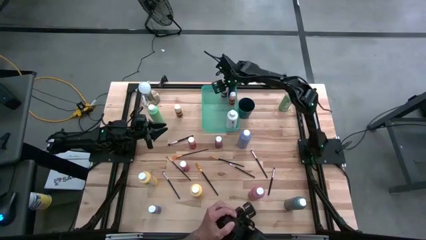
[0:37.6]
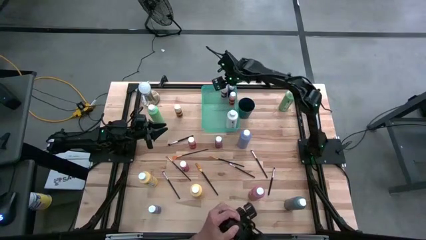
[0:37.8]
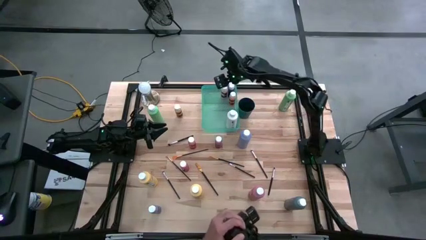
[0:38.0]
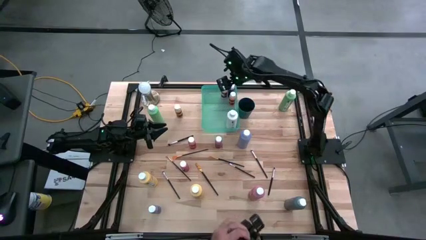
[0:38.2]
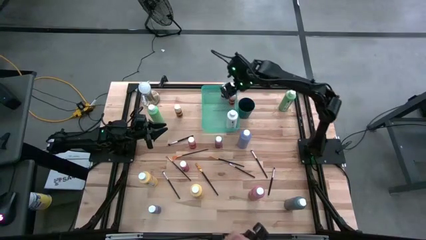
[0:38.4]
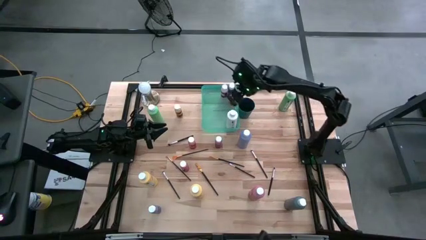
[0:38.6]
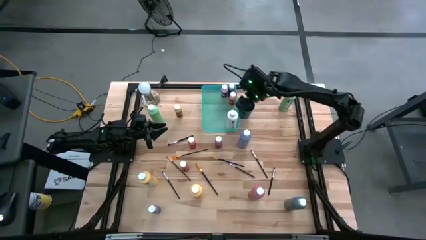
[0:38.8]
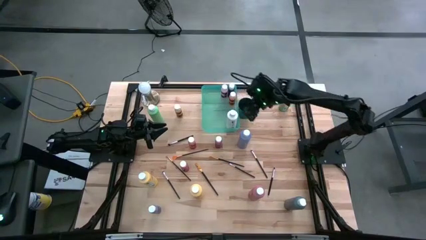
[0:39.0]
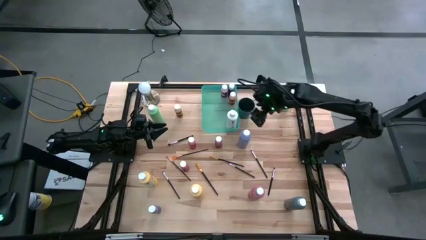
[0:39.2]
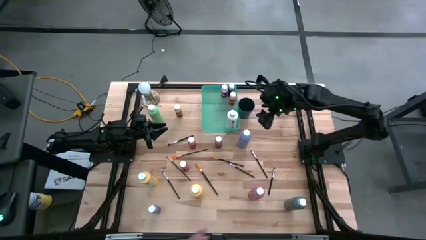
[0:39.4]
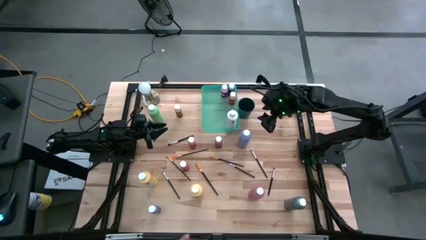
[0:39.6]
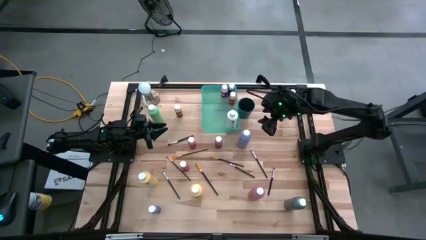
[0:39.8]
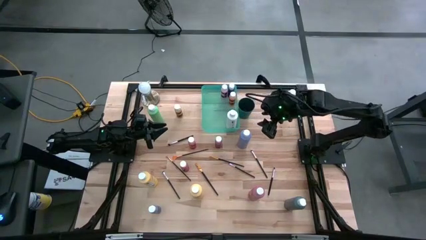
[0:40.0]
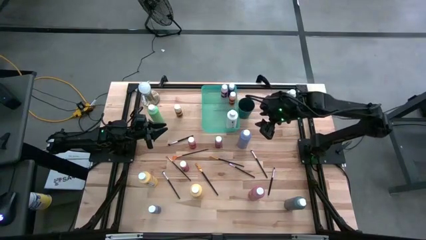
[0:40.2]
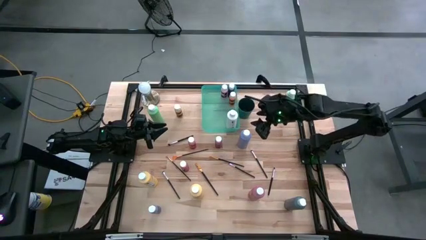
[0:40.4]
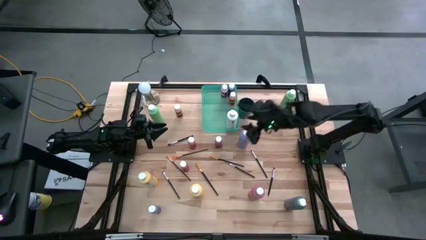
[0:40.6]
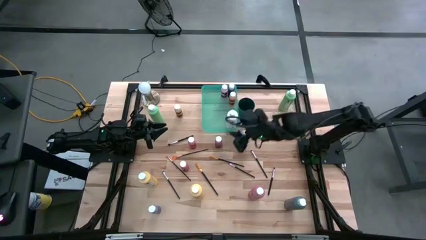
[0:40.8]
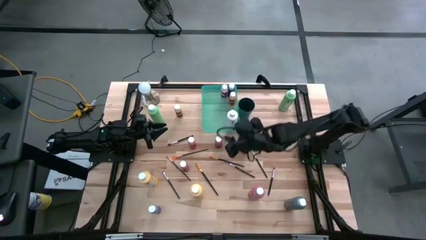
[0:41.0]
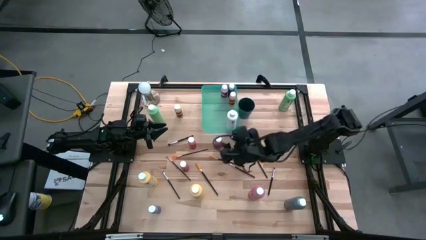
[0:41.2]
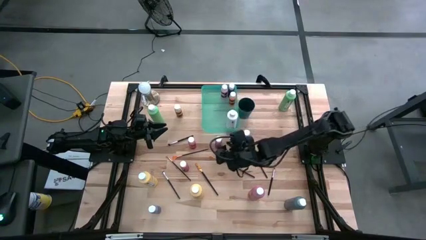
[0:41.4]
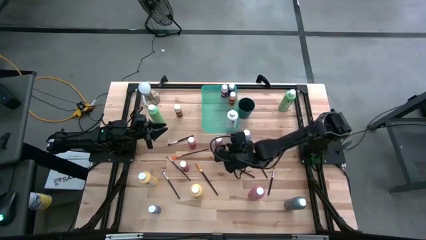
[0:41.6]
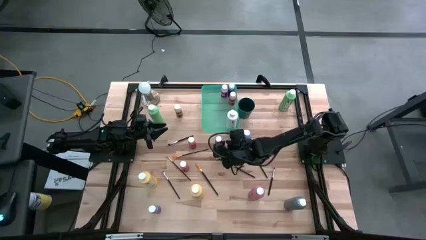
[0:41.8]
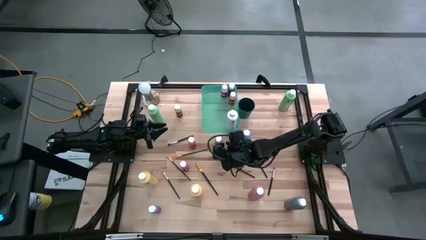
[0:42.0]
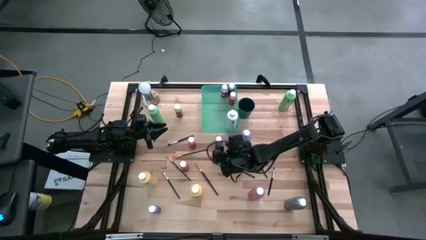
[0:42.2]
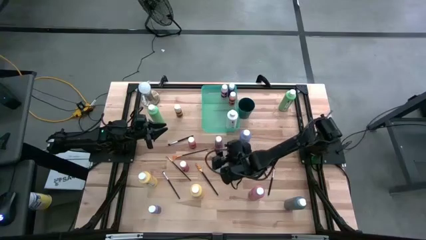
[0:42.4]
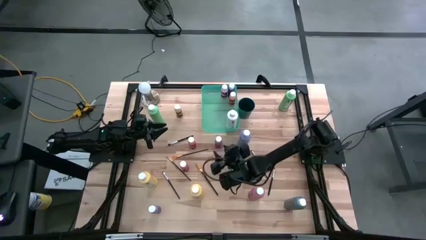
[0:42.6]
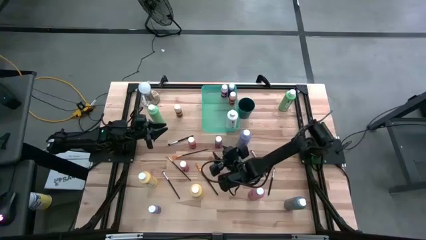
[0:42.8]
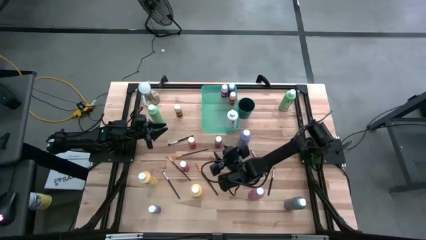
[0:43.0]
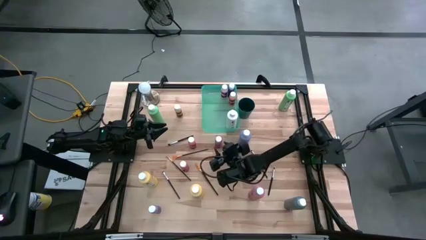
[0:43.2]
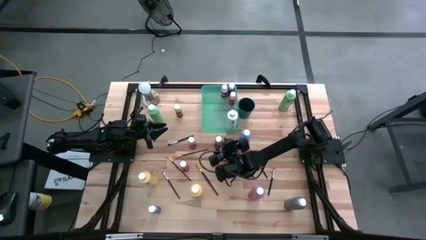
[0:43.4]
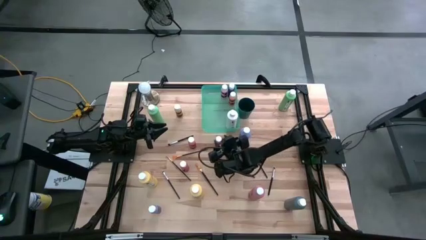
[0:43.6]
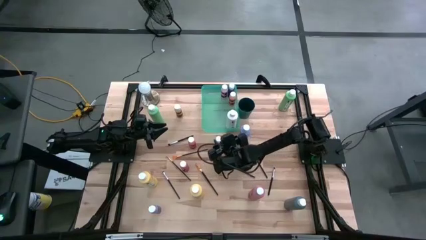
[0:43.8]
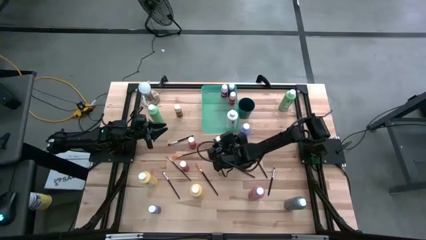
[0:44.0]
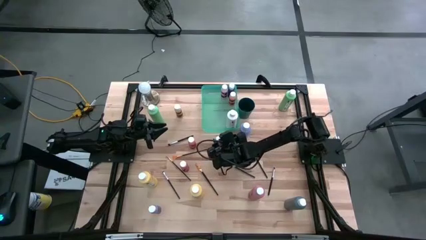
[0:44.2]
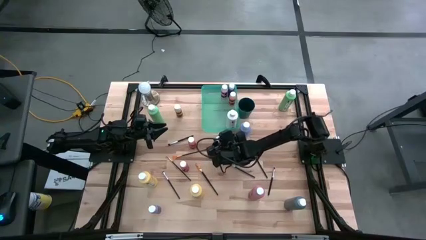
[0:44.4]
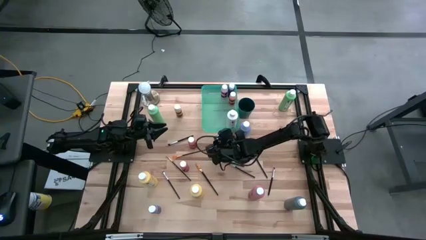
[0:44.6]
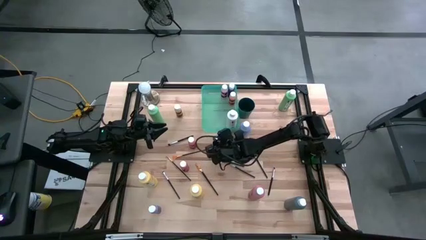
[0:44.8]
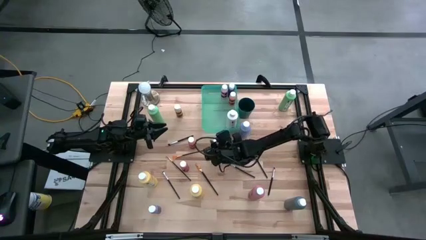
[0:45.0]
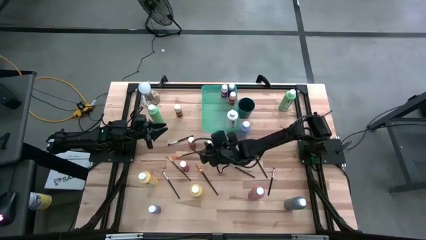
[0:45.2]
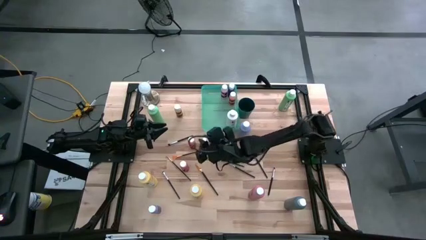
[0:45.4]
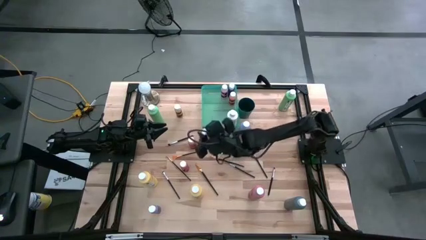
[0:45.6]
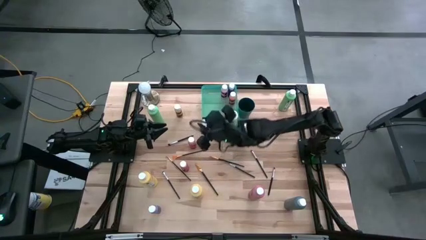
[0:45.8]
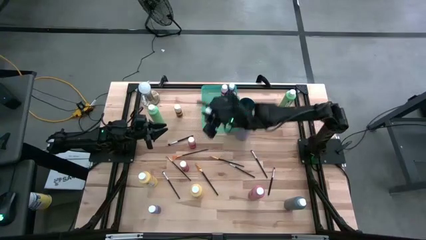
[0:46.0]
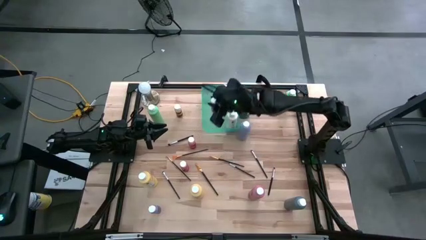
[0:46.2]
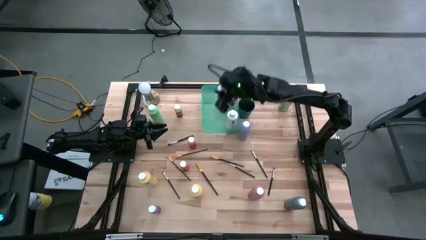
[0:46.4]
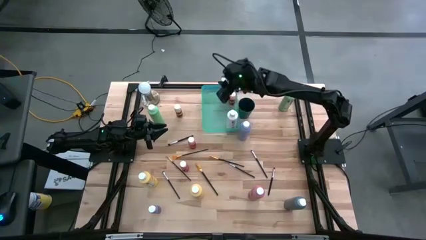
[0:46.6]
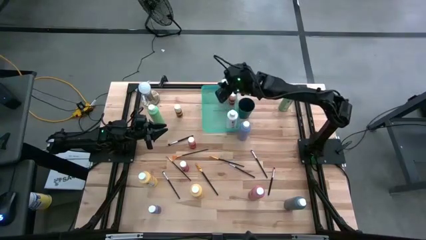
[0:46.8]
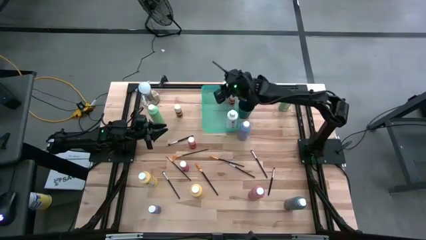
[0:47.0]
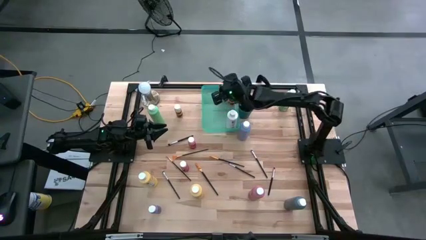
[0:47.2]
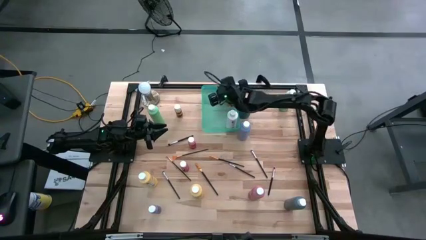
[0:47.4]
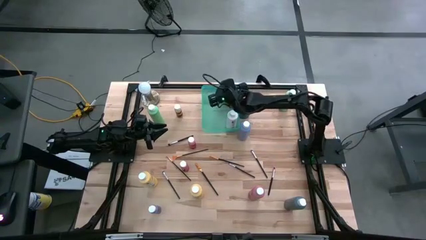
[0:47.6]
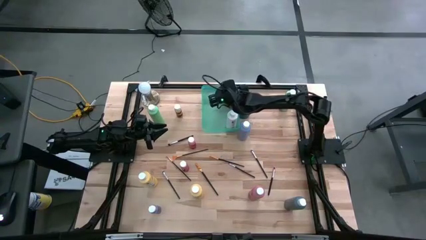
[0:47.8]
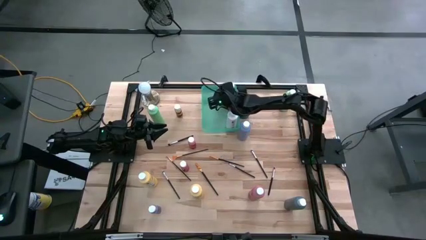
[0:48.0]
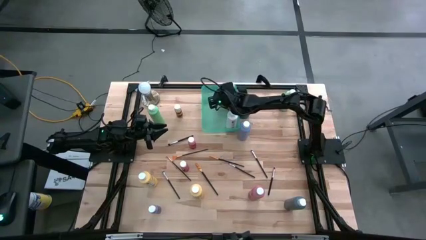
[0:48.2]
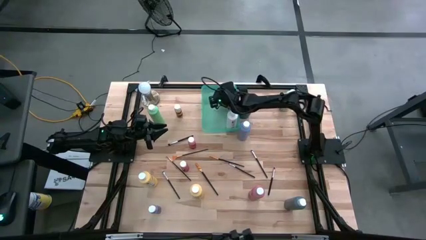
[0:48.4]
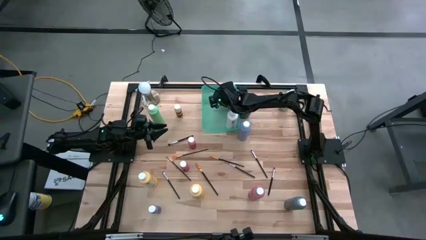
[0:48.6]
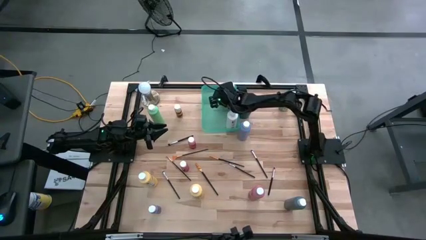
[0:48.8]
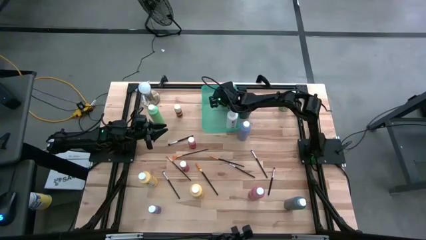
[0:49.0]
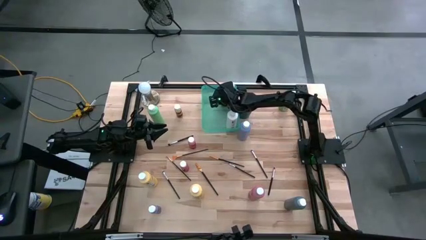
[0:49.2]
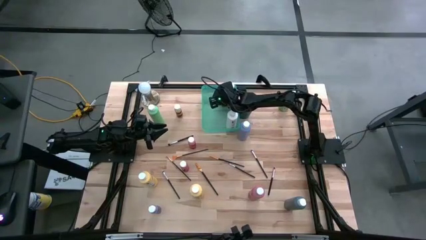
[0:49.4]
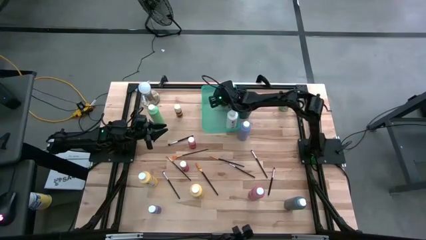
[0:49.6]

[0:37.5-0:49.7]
Task: Pick & Place Paint Supplies
Put the red paint bottle into the green bin

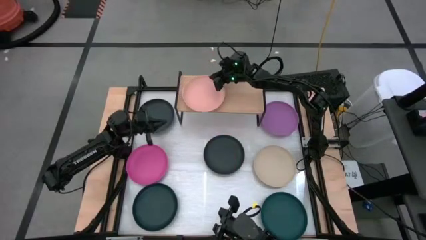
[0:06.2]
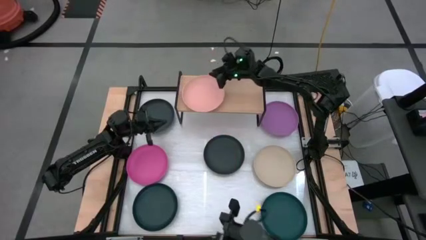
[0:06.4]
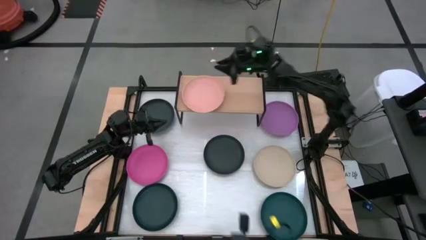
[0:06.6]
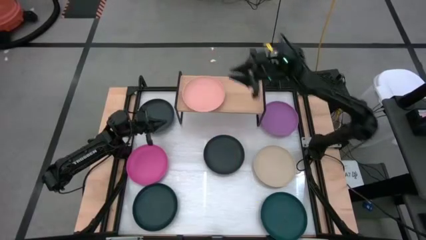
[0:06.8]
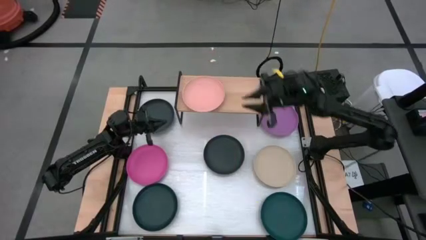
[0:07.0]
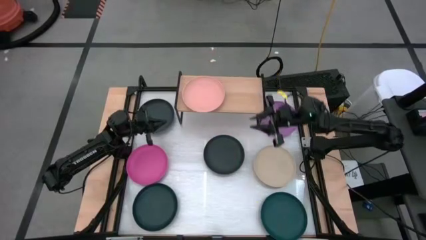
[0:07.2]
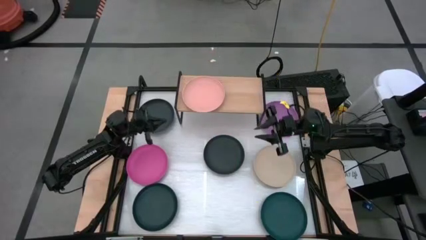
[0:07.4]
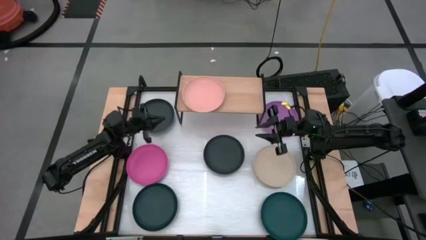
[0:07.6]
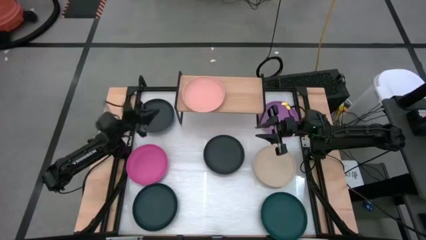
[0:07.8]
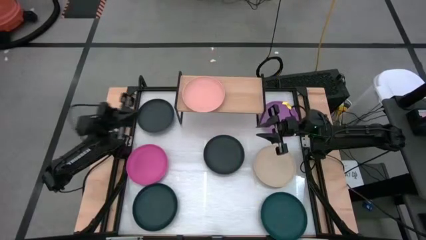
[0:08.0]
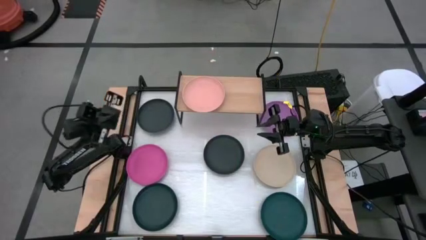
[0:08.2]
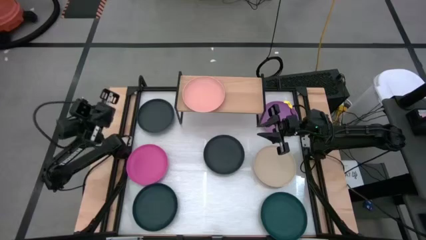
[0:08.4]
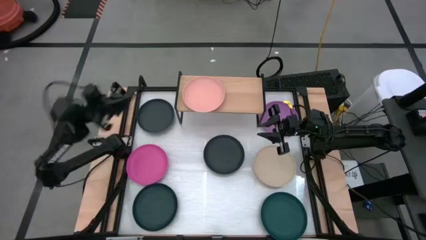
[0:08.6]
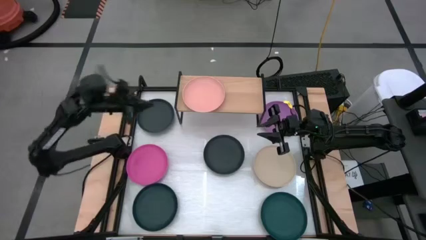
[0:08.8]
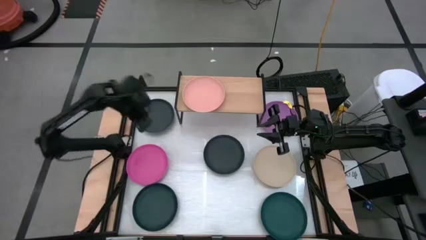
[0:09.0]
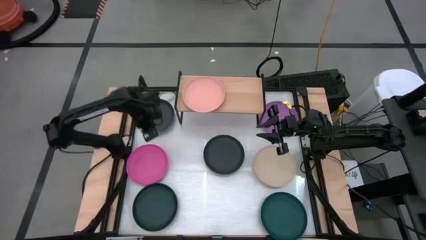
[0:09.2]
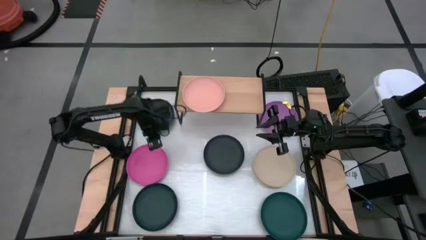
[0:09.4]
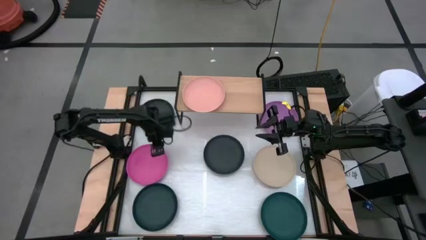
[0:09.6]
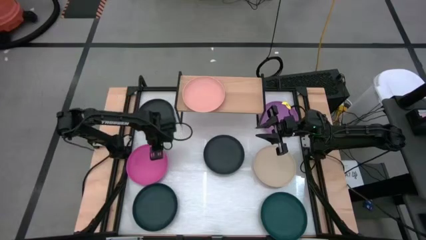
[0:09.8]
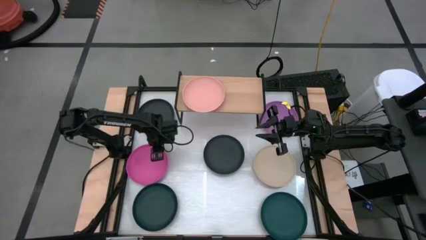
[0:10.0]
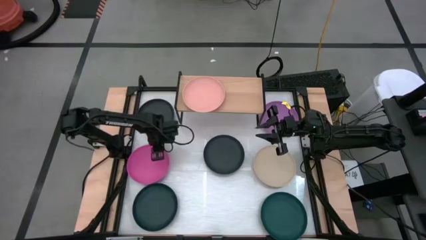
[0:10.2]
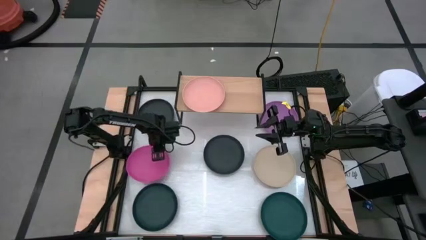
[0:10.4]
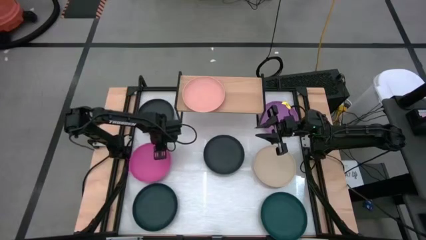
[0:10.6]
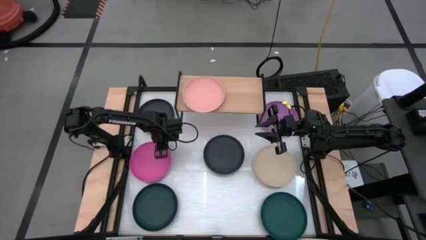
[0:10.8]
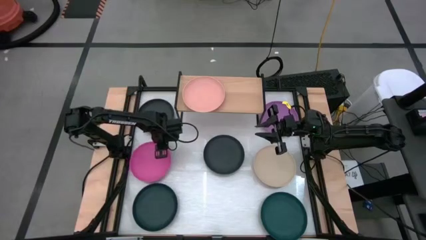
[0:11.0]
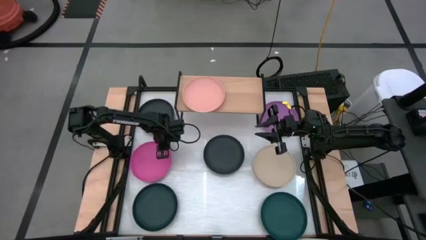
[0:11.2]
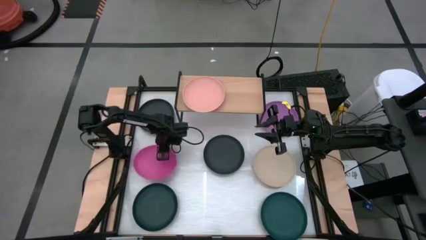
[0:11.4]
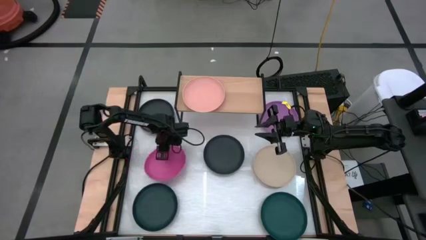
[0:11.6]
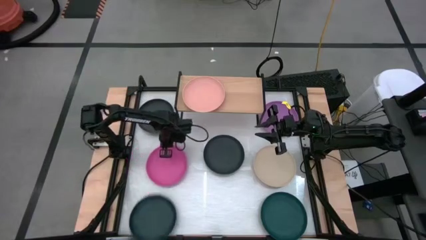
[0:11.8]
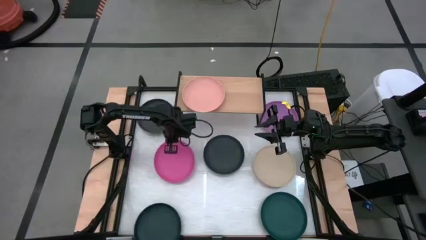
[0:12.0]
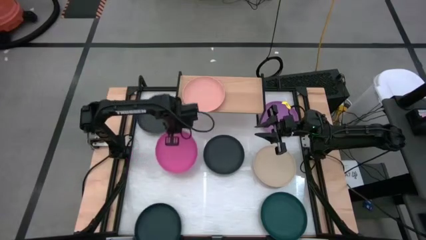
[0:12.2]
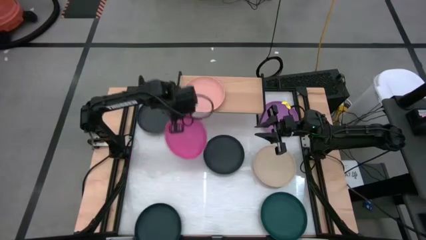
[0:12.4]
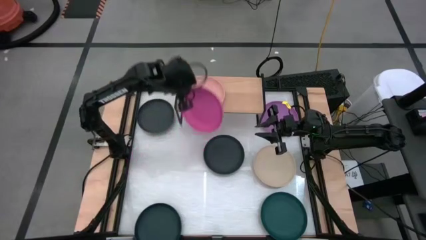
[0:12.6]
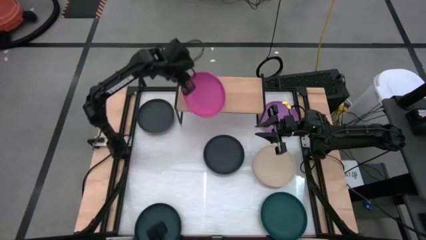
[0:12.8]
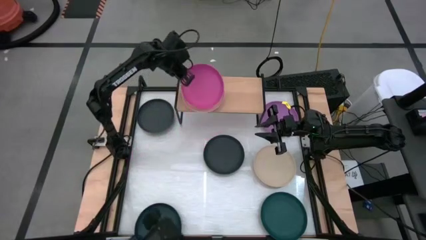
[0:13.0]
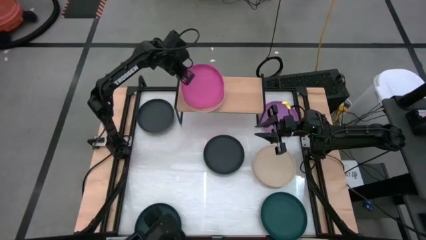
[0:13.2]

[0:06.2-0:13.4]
Task: Place and stack plates onto a shelf
Stack the pink plate on top of the orange plate on the shelf
